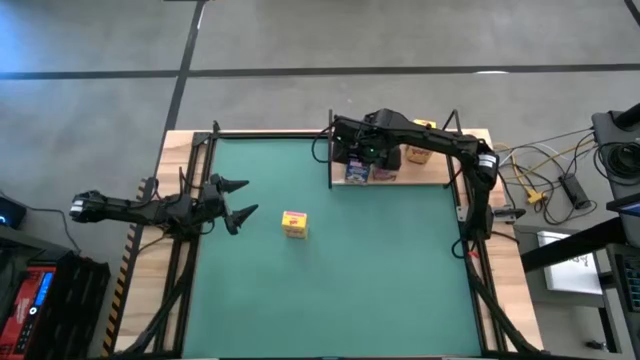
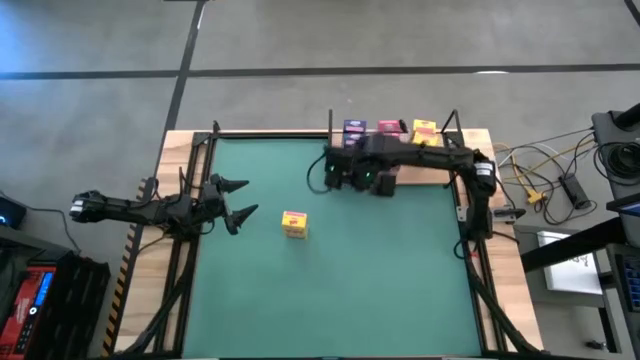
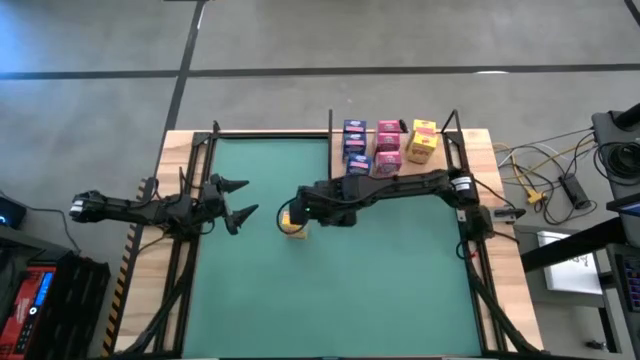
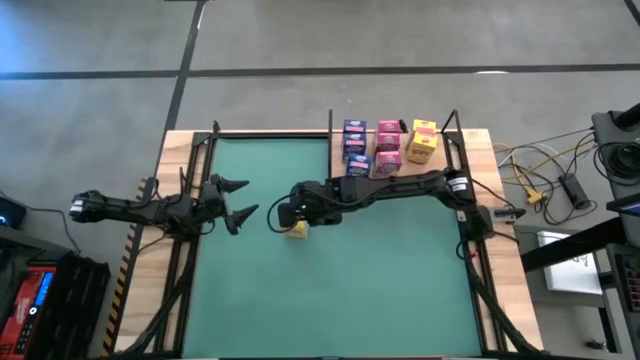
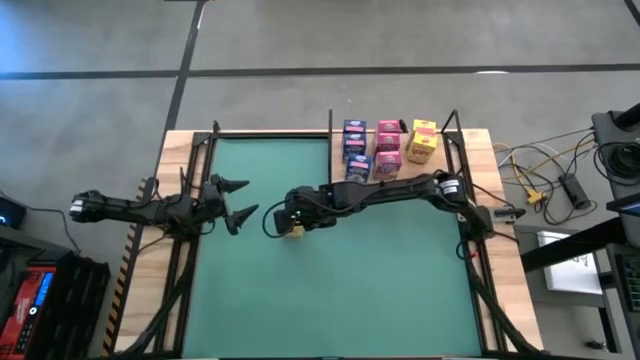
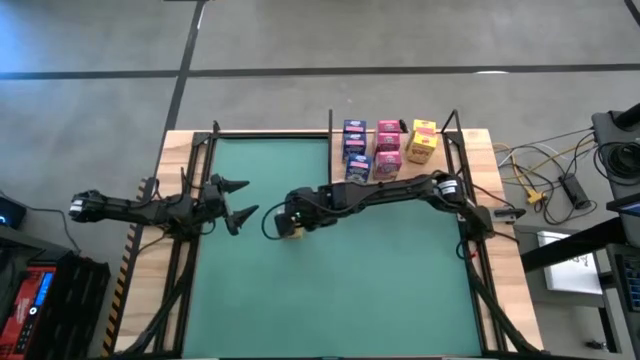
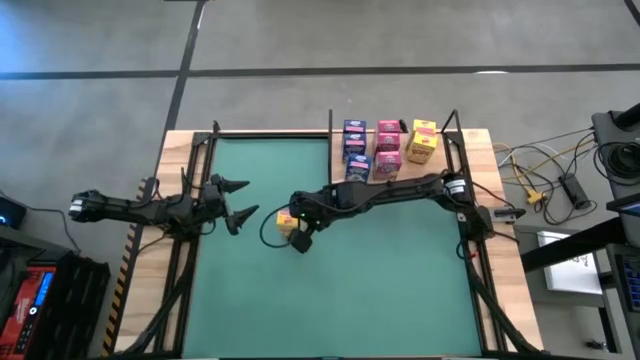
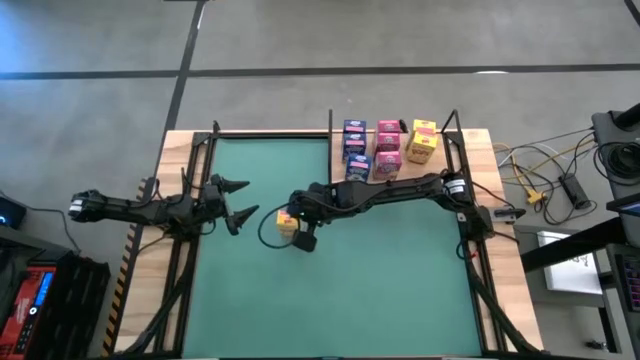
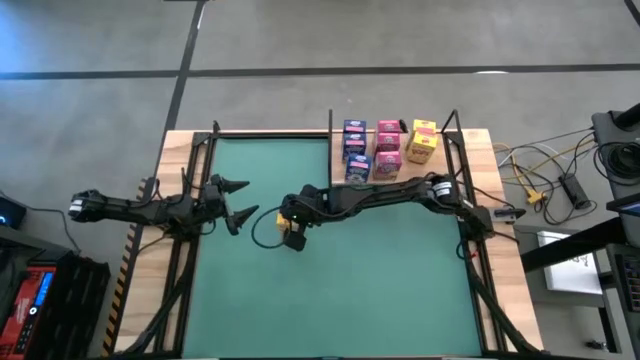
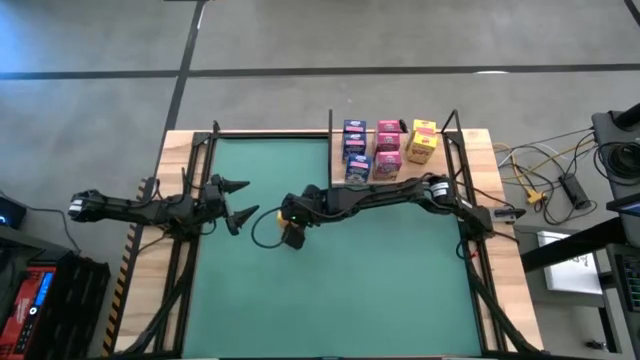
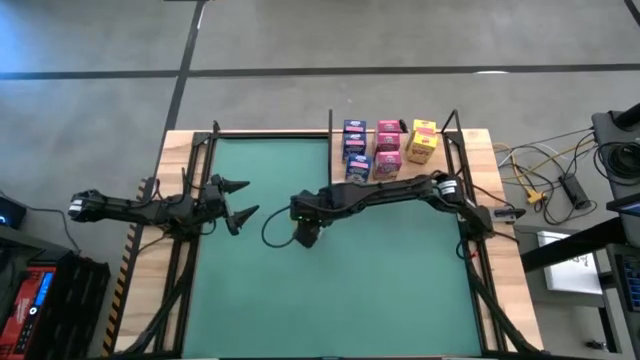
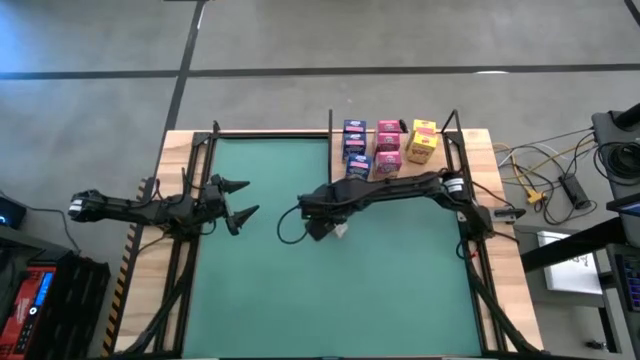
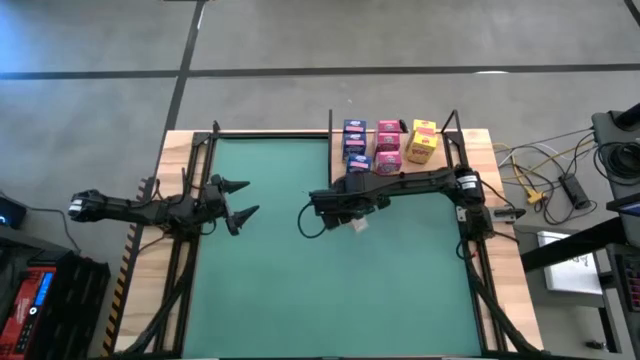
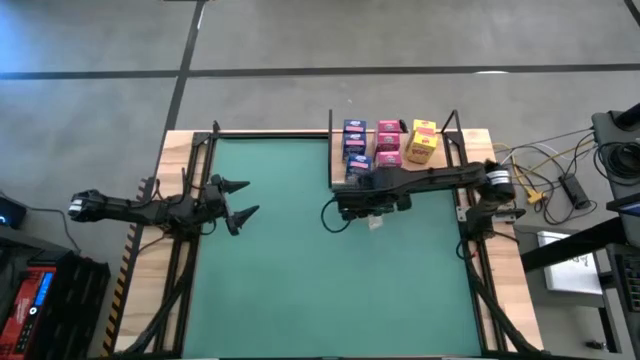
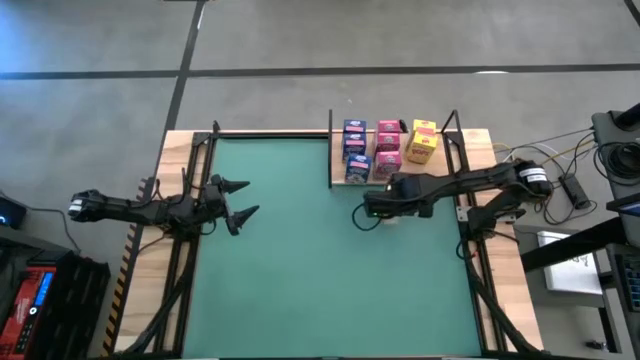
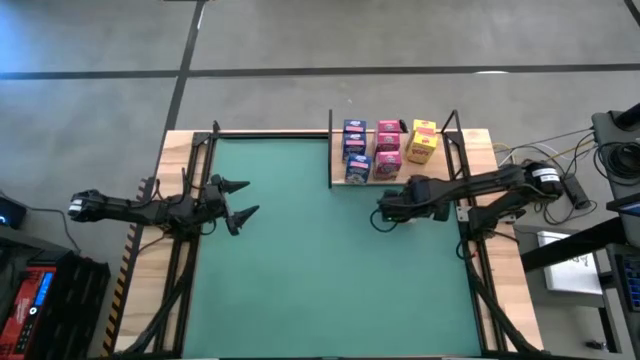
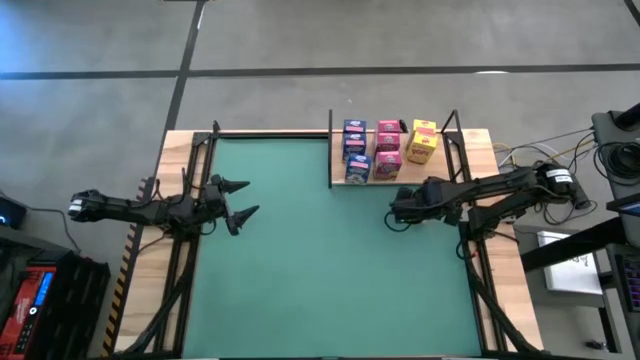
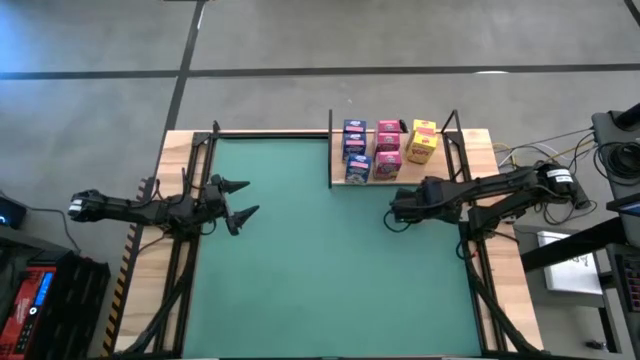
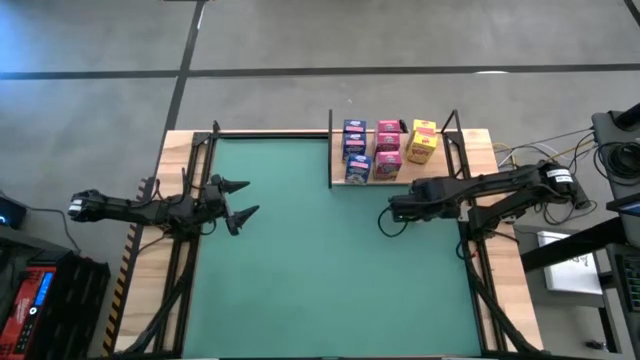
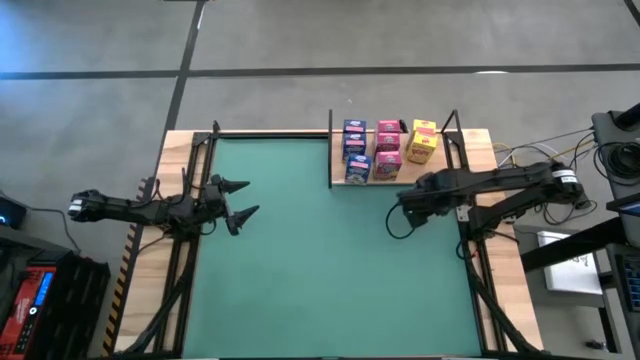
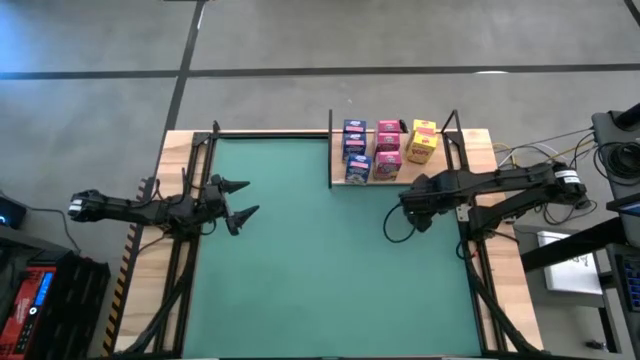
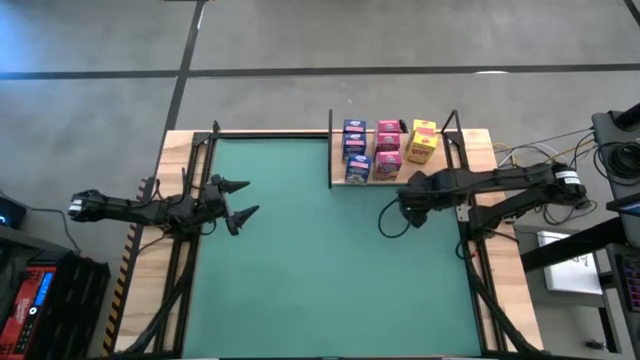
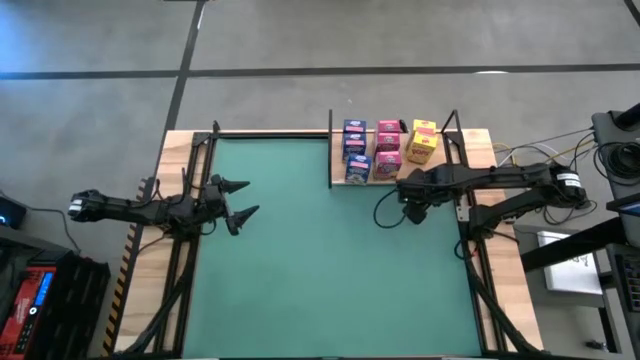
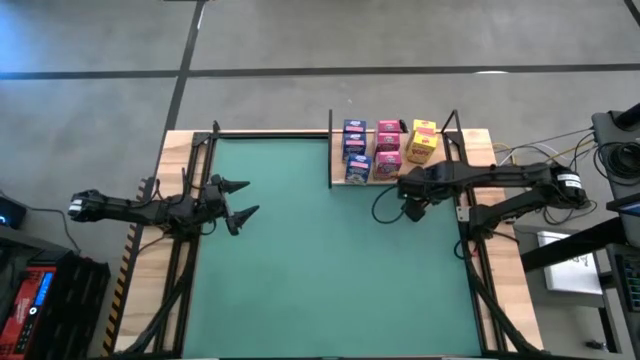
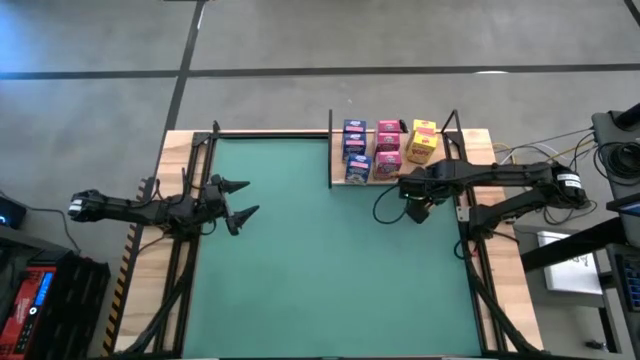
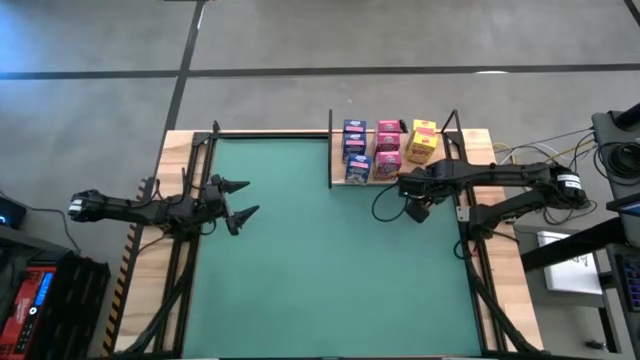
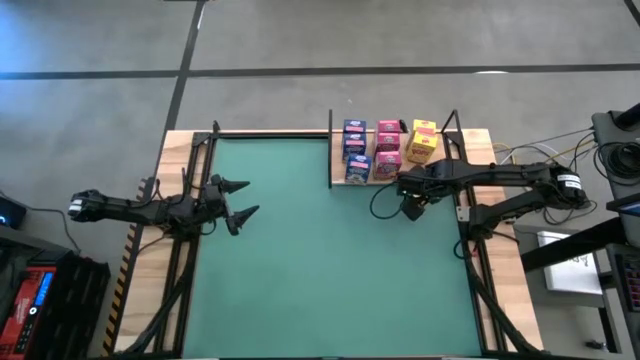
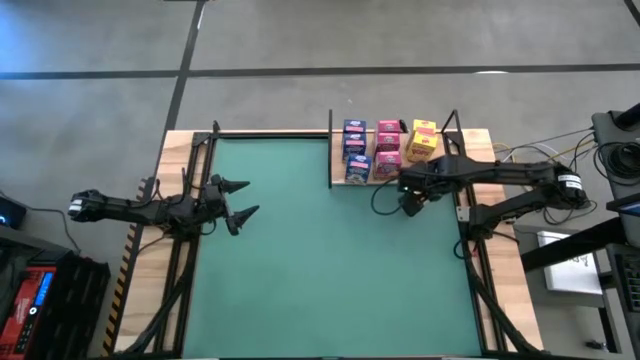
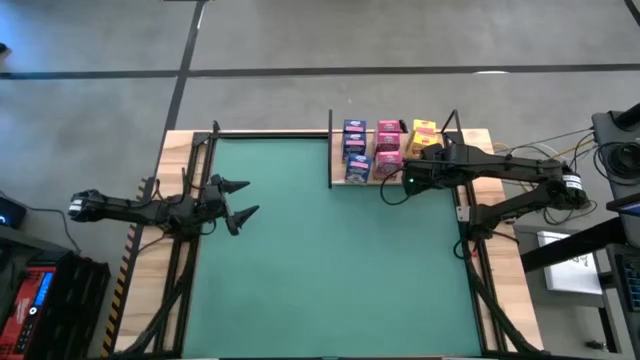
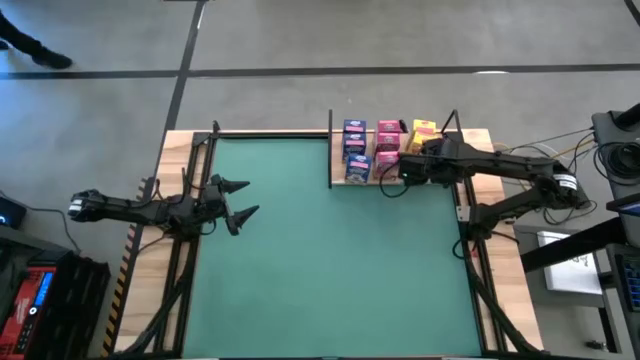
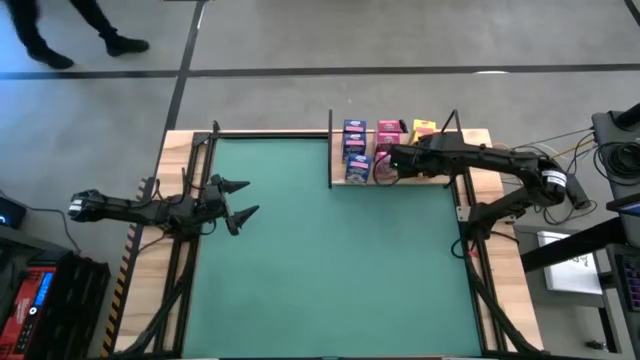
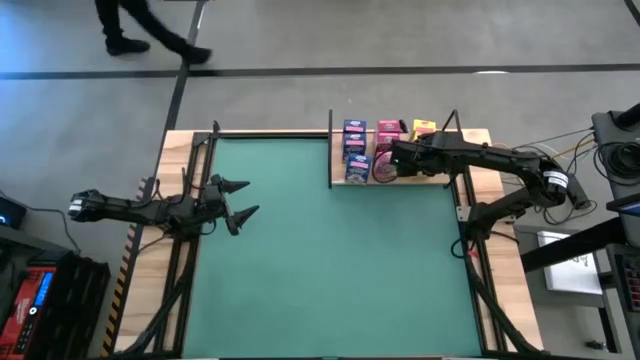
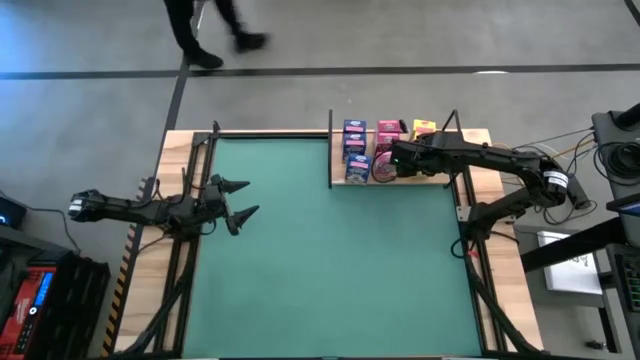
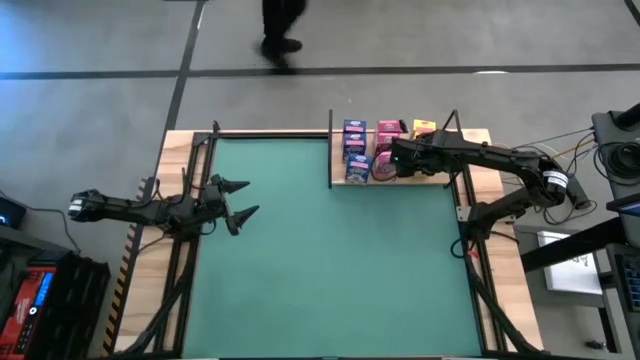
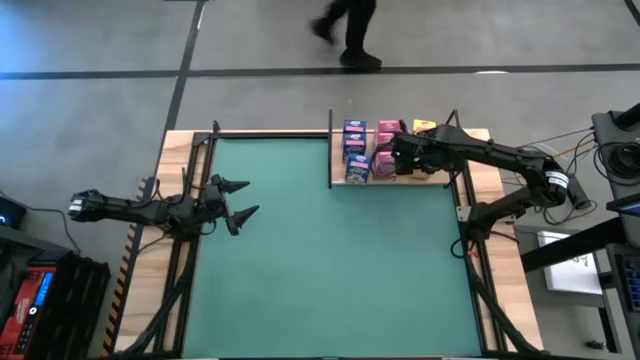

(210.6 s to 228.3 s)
Task: Stack cereal on shelf
Put the yellow cereal box onto the shelf

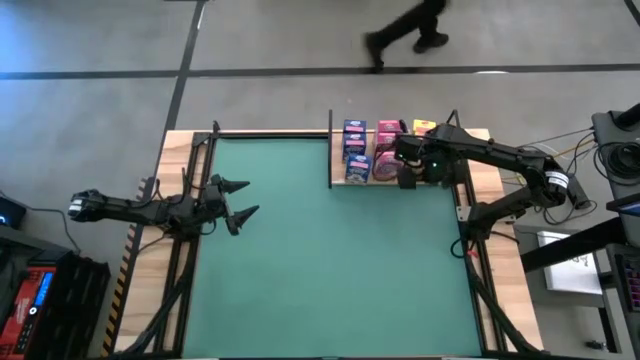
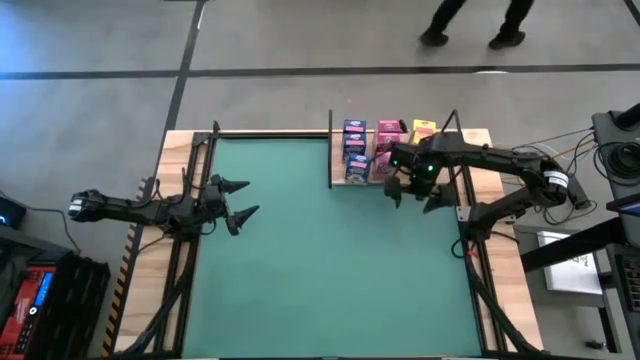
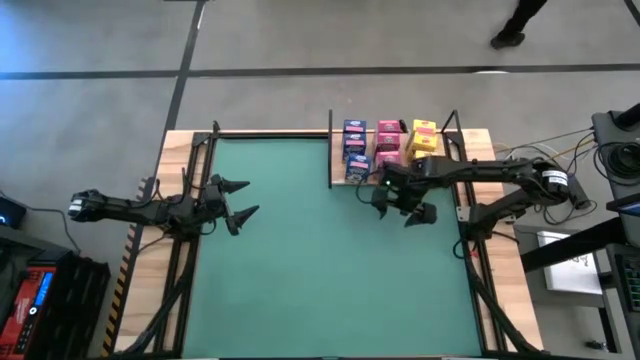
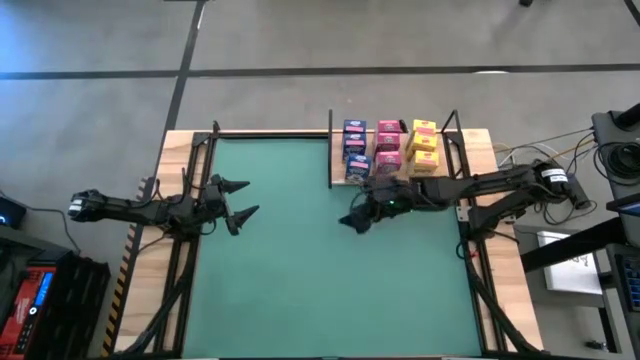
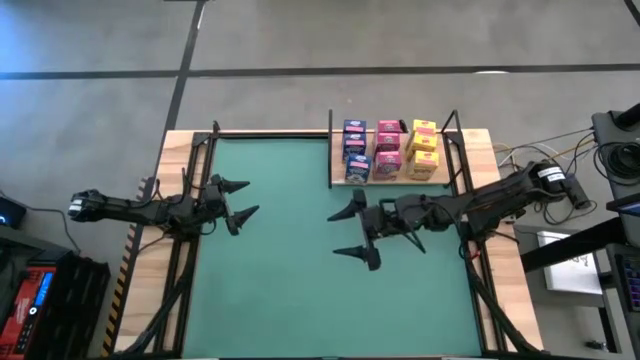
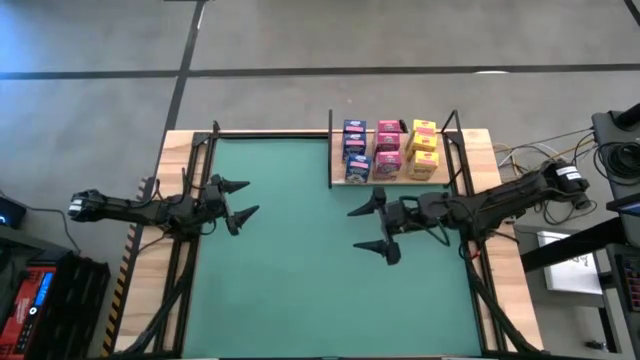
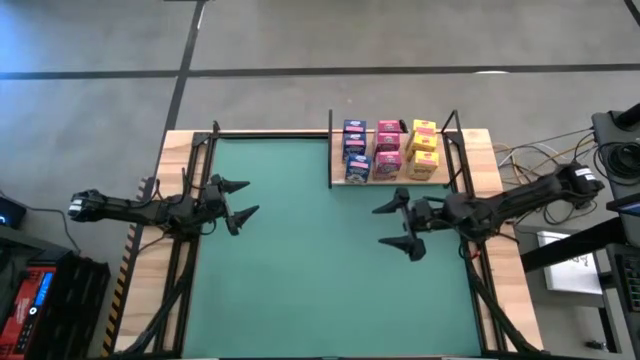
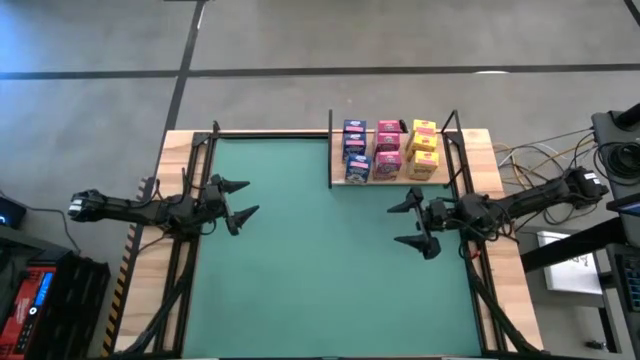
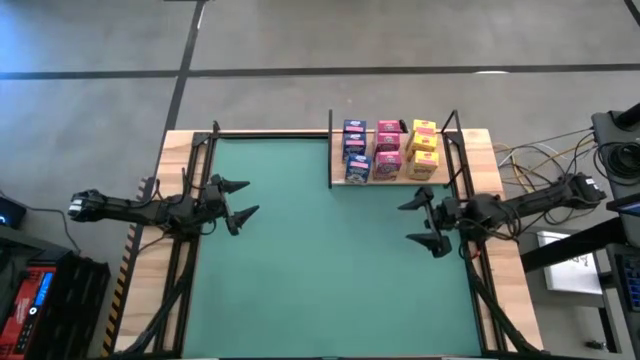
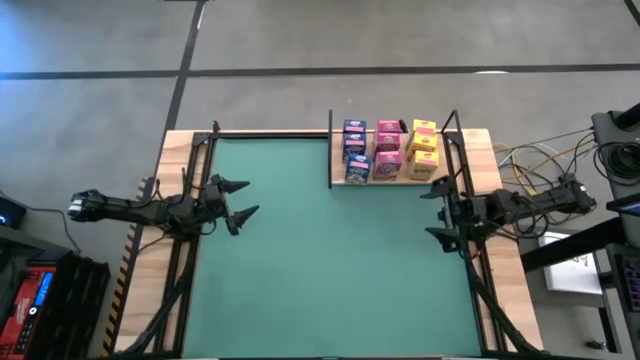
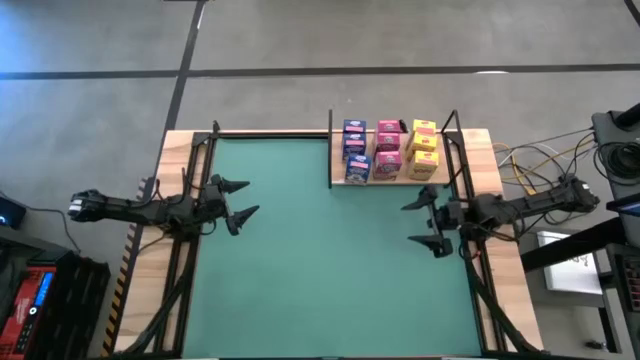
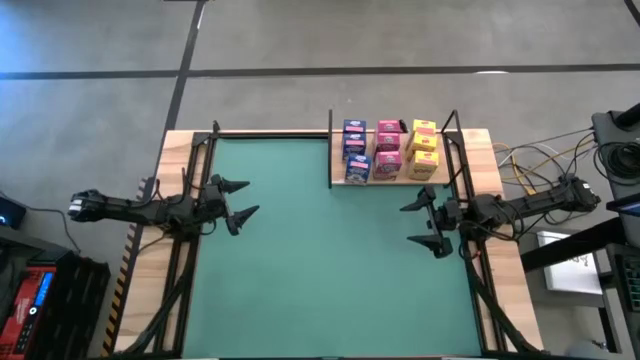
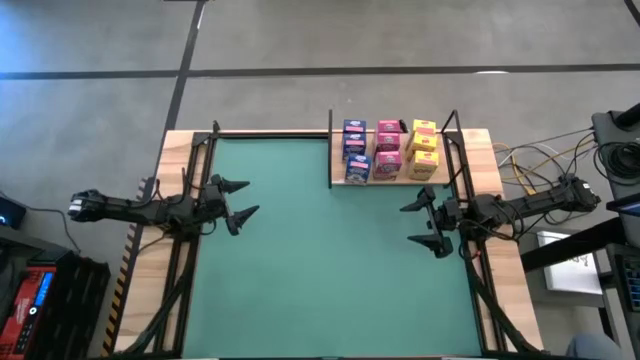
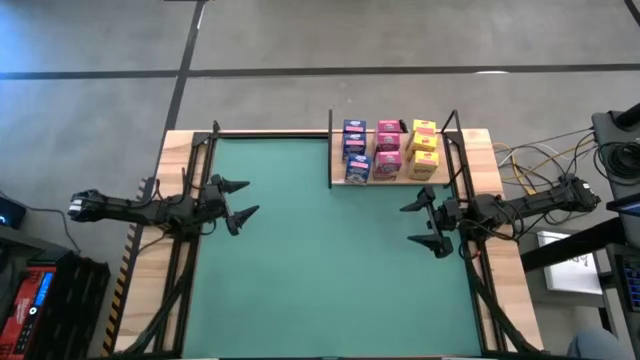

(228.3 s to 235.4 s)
Return to Home Position
